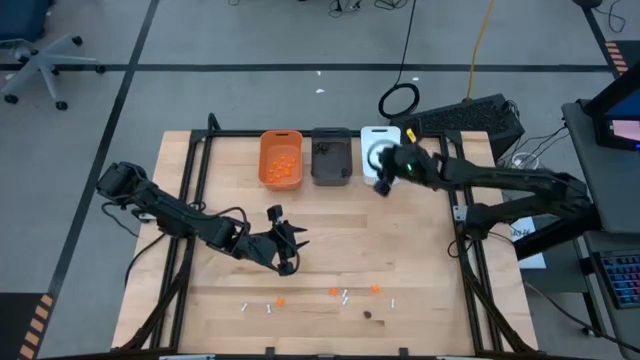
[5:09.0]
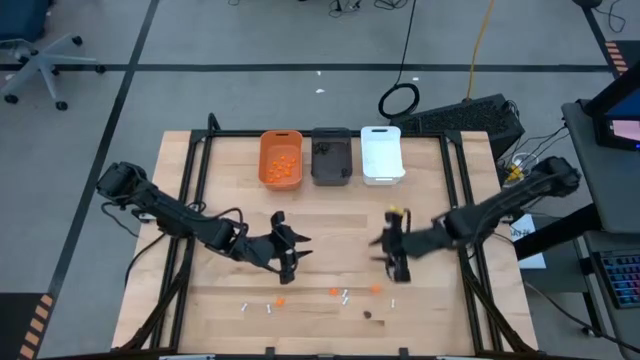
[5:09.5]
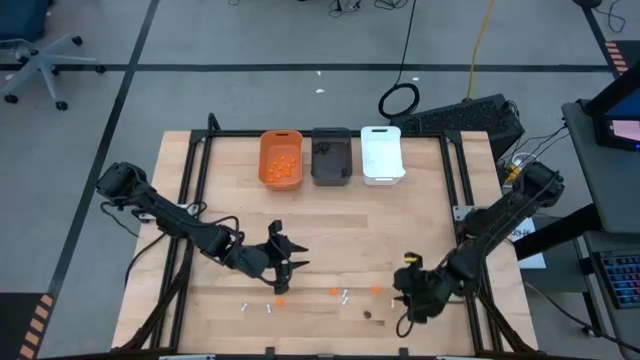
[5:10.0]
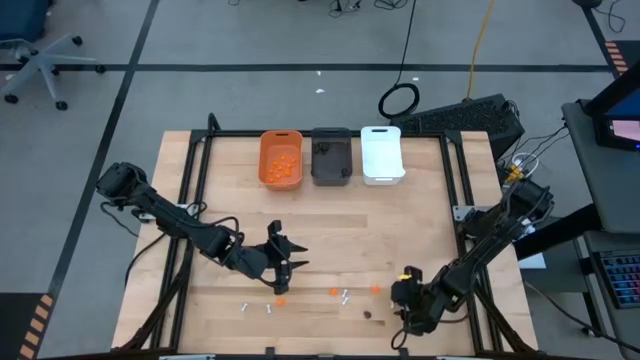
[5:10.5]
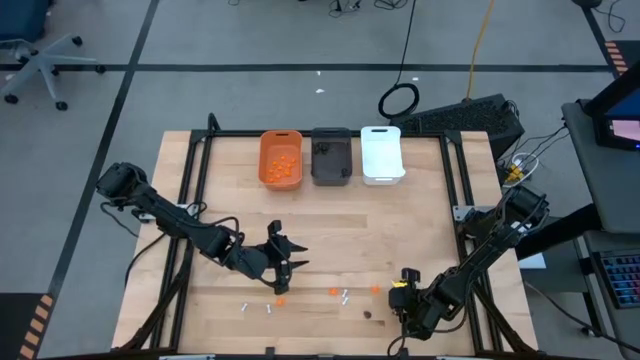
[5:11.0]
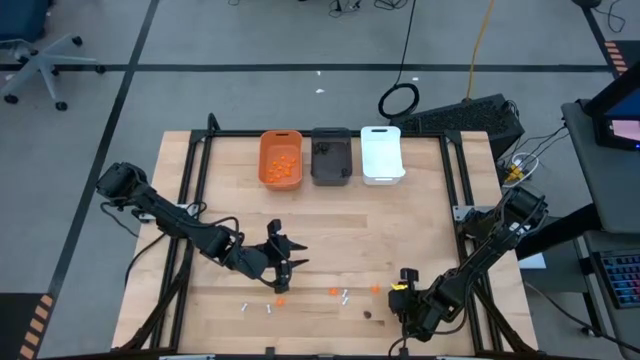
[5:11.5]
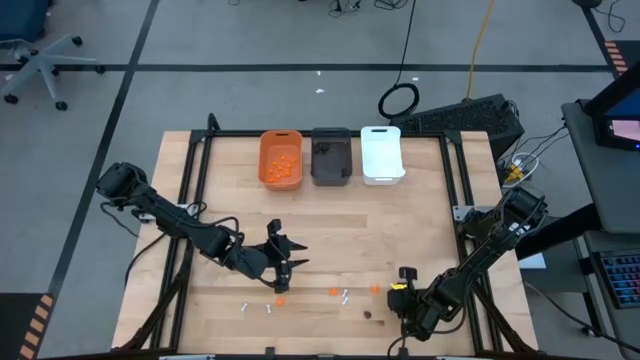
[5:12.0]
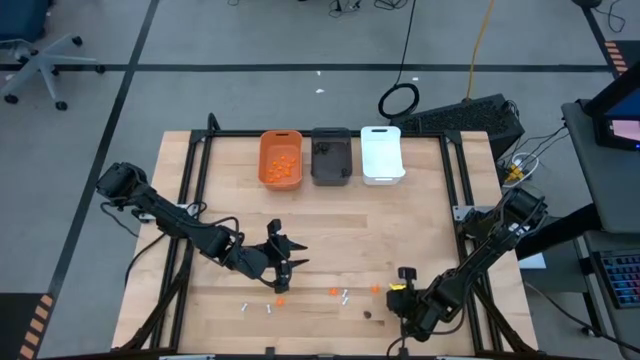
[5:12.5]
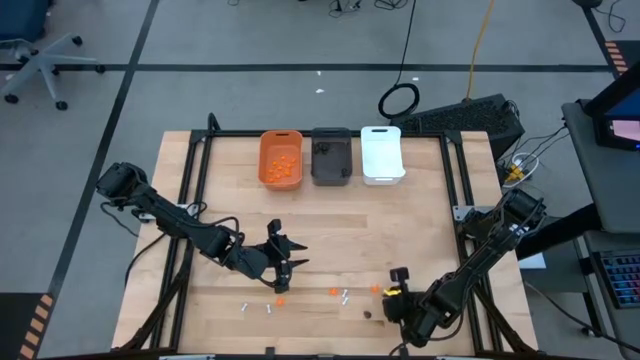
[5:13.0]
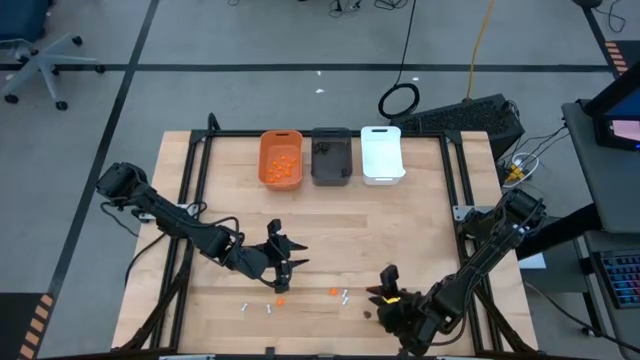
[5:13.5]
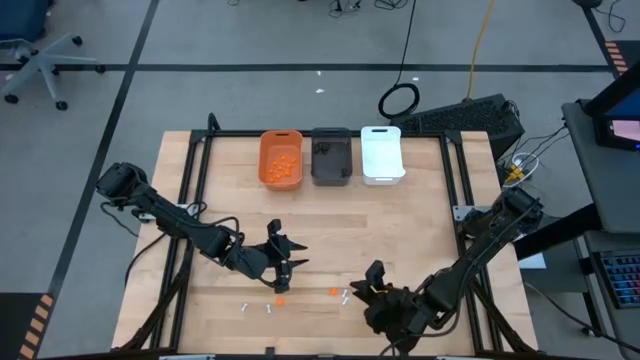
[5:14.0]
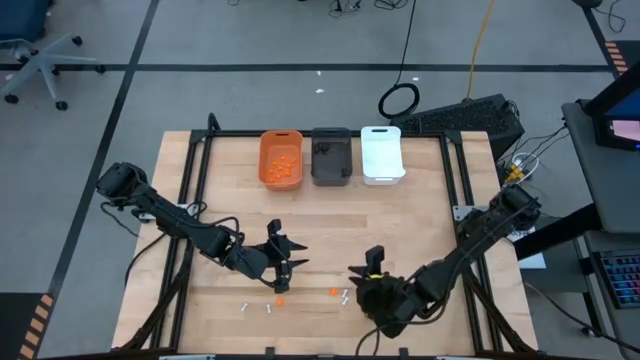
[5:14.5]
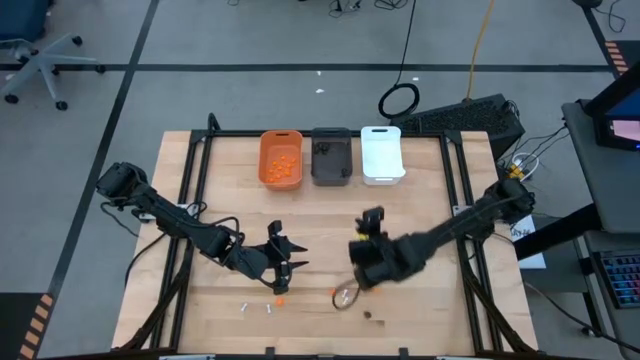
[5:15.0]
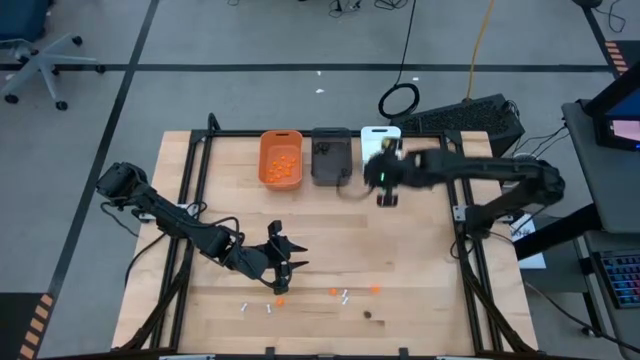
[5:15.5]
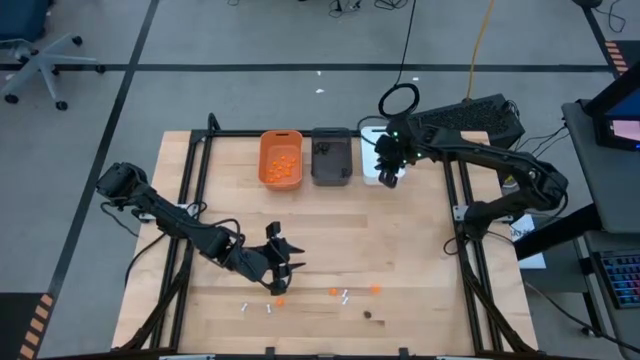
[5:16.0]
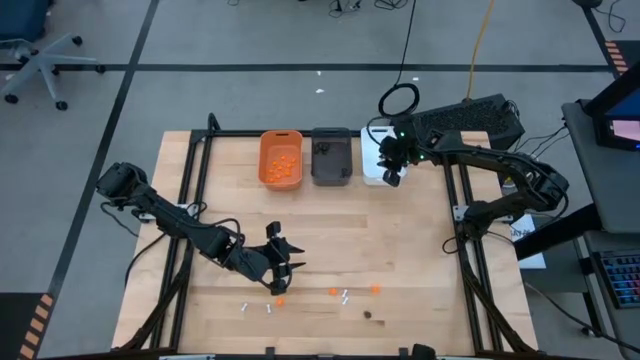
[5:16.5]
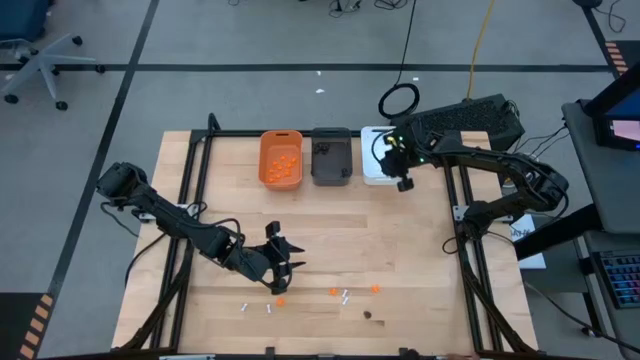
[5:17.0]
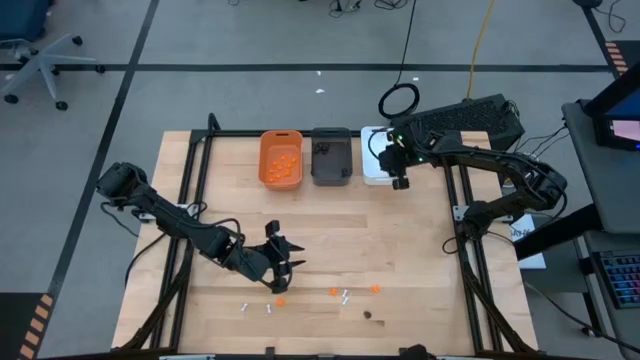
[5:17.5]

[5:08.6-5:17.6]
Task: Sort Halloween decoration
Put the white bone toy into the white bin

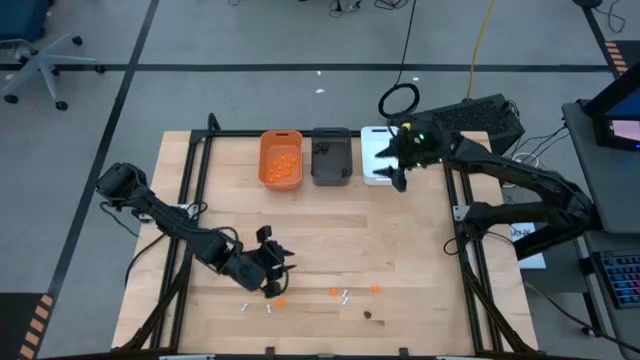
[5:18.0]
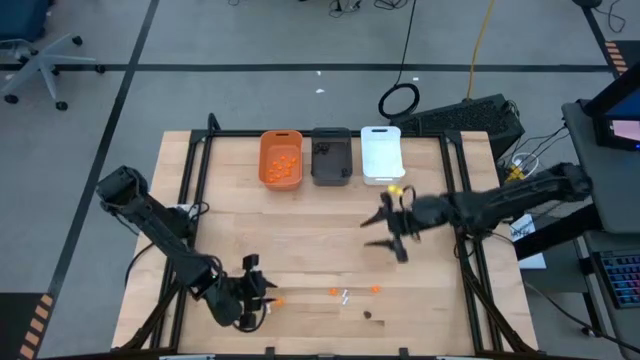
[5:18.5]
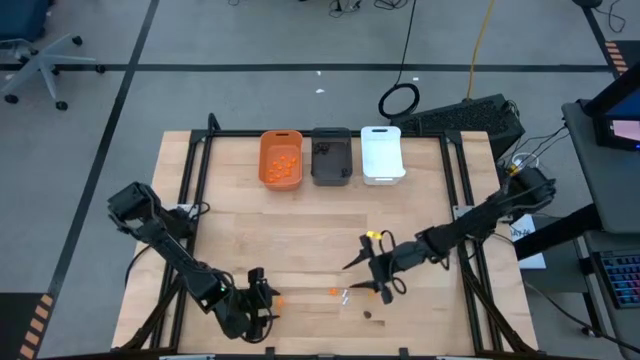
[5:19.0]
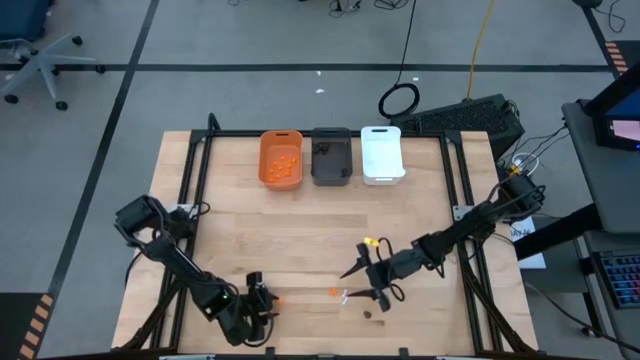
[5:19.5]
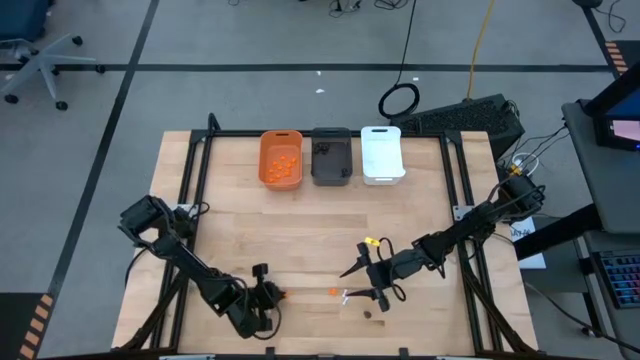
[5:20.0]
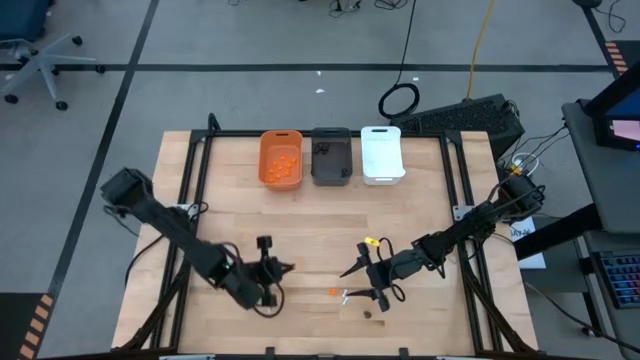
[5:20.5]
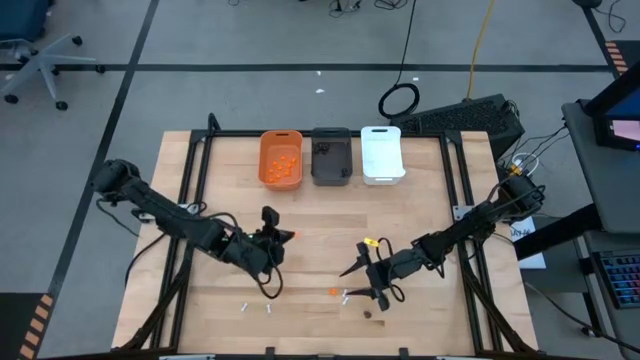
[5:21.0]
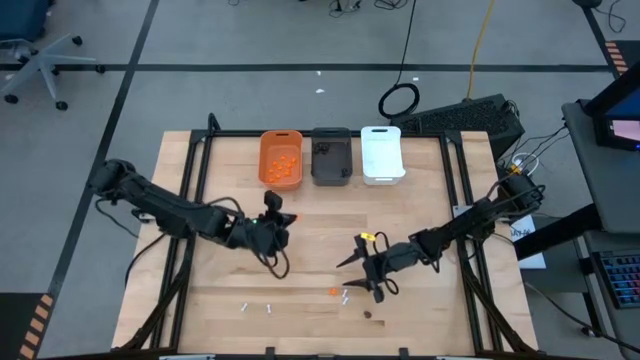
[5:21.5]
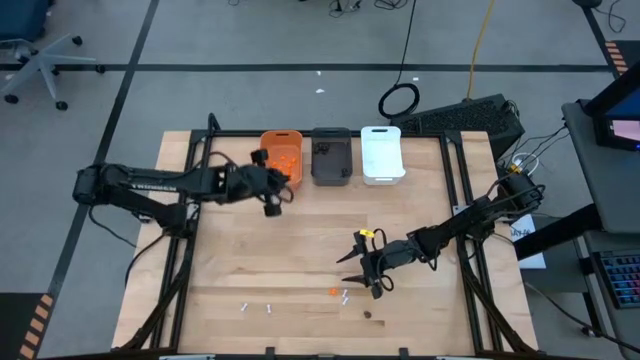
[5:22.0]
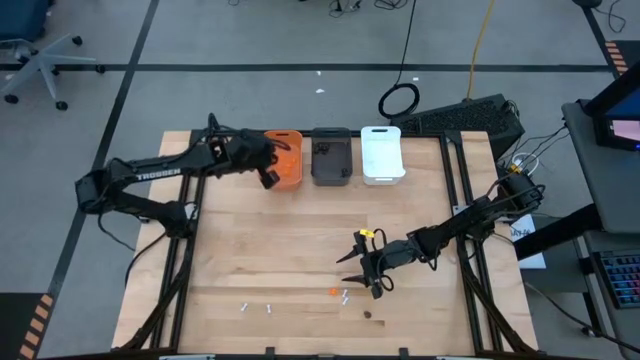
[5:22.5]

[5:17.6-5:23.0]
Put the orange spider toy into the orange bin

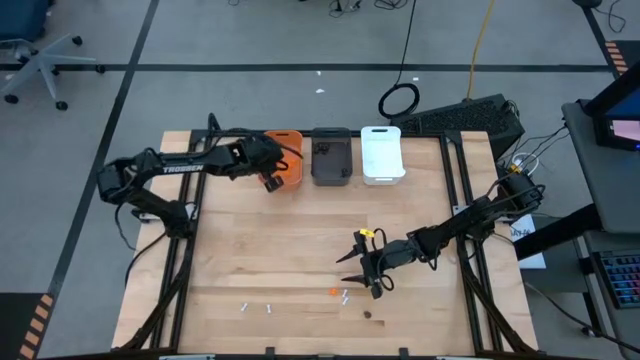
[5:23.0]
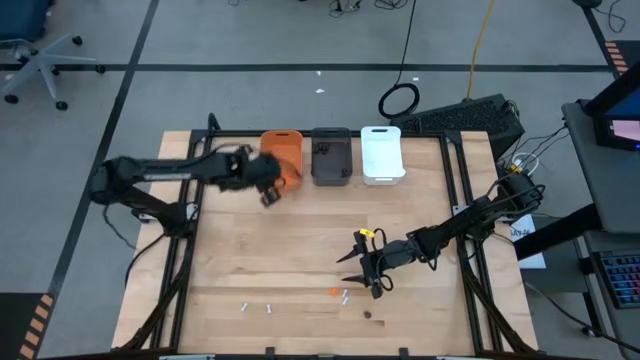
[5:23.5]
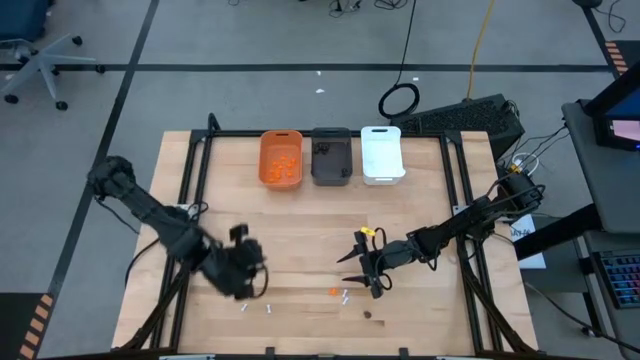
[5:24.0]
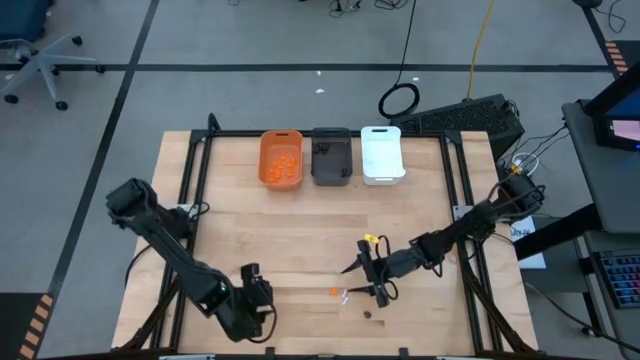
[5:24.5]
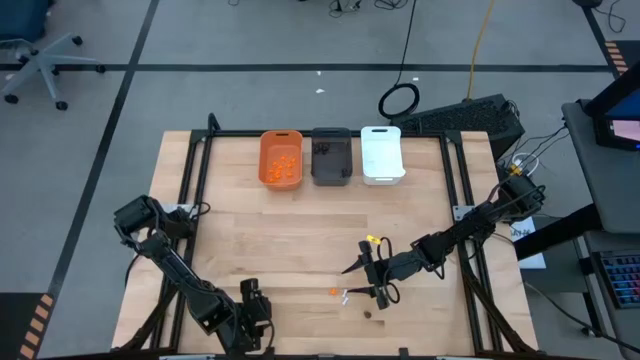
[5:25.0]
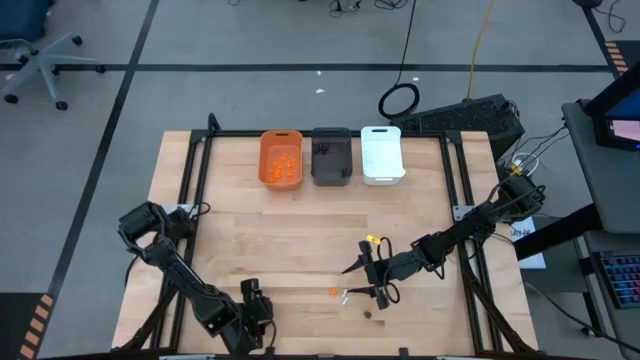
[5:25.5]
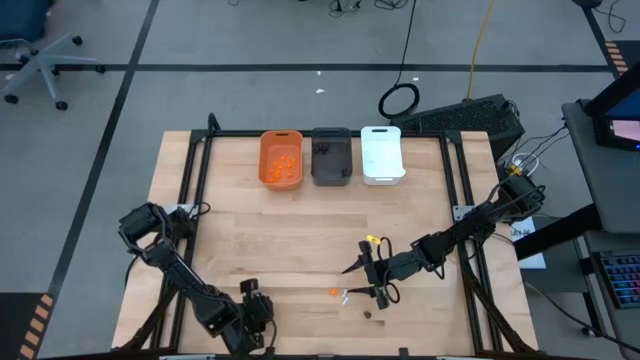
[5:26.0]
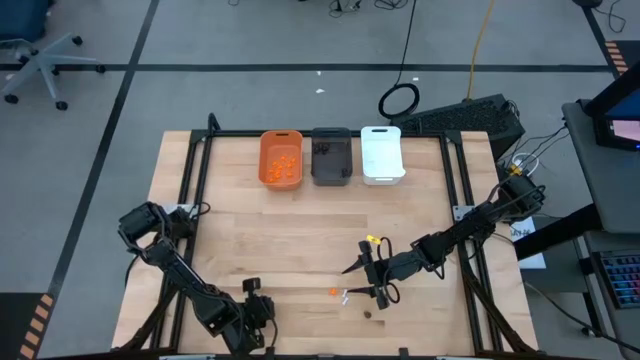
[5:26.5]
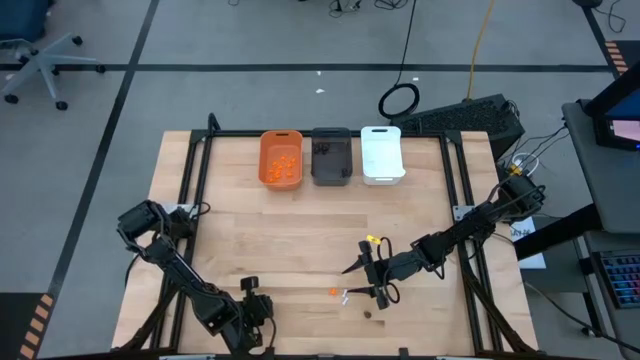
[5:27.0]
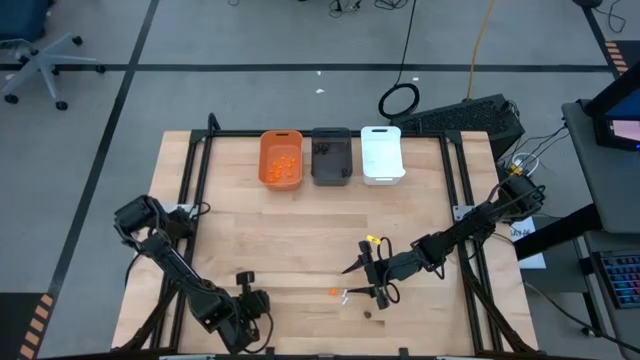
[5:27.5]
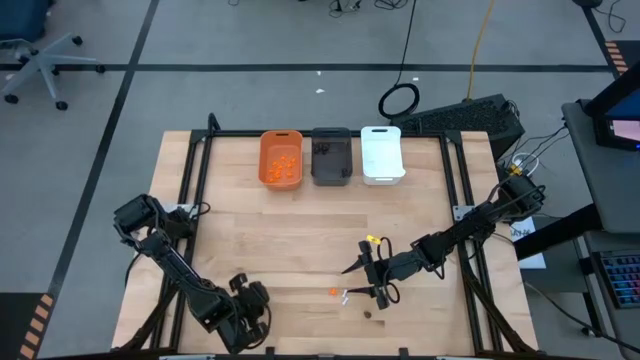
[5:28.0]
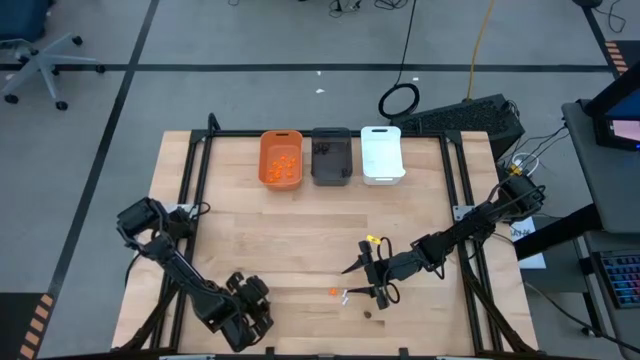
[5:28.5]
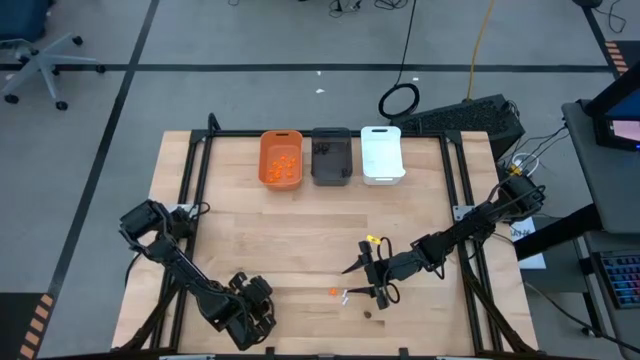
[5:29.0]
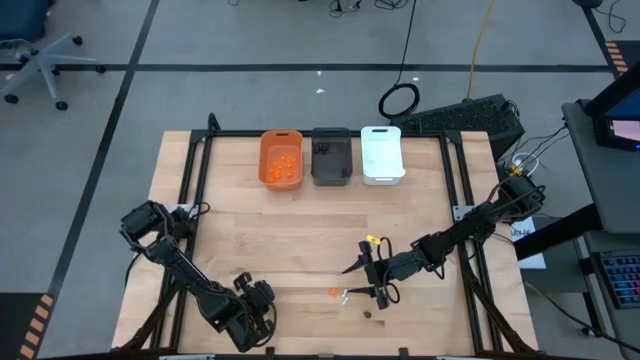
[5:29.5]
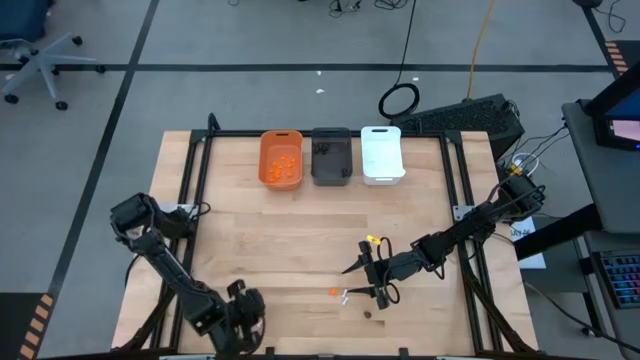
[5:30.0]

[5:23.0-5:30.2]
Put the white bone toy into the white bin
